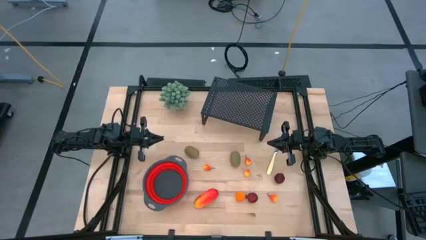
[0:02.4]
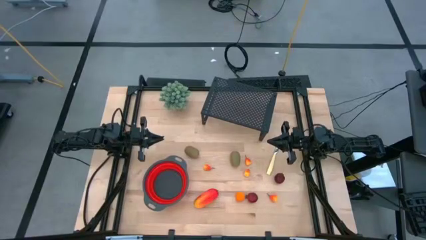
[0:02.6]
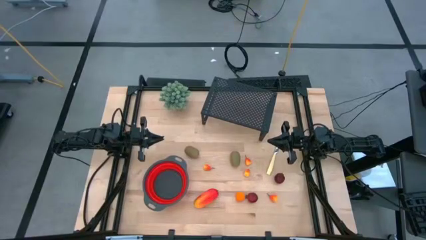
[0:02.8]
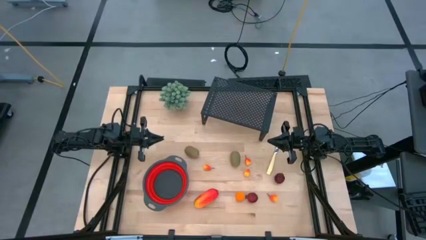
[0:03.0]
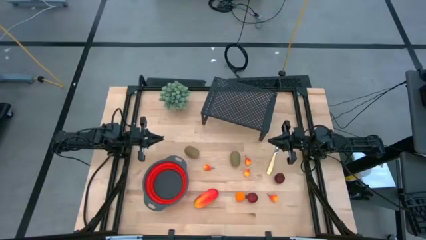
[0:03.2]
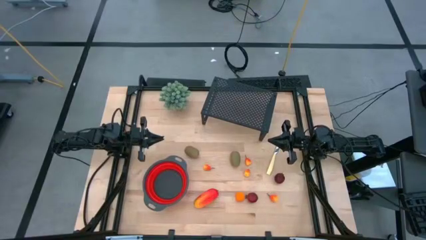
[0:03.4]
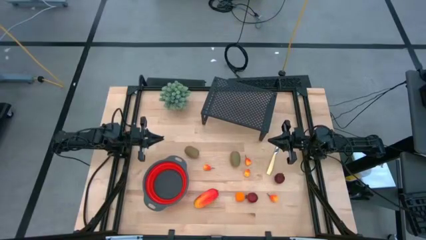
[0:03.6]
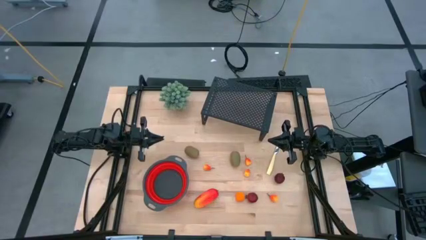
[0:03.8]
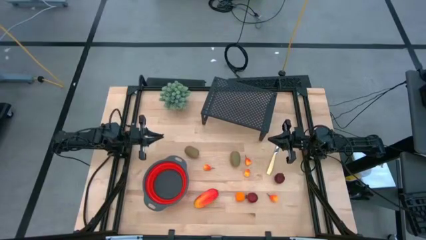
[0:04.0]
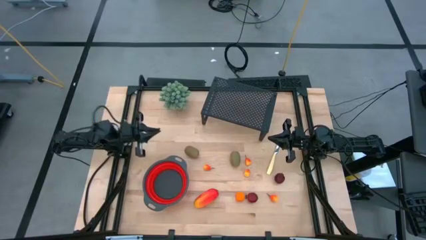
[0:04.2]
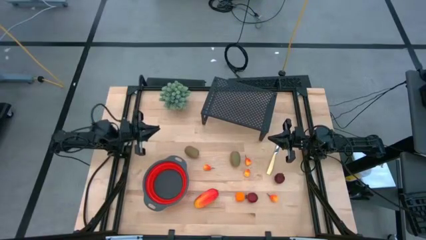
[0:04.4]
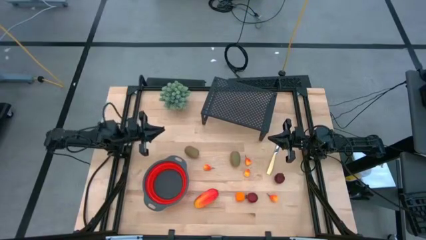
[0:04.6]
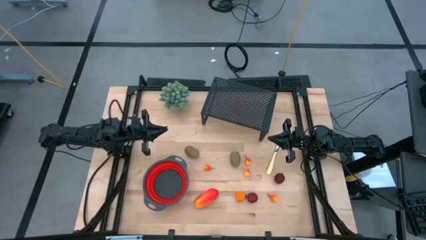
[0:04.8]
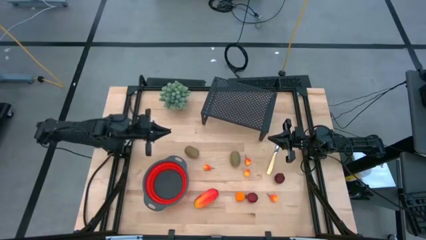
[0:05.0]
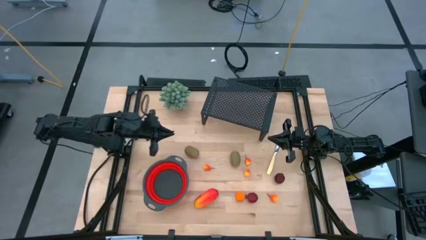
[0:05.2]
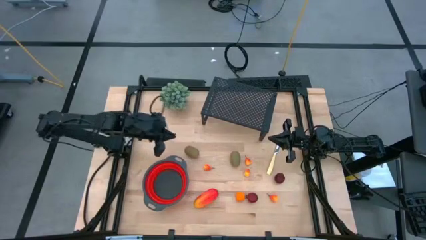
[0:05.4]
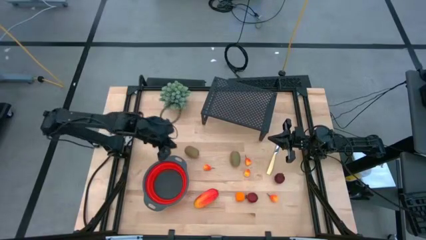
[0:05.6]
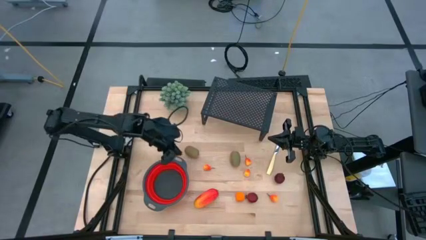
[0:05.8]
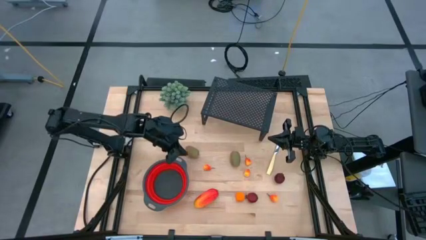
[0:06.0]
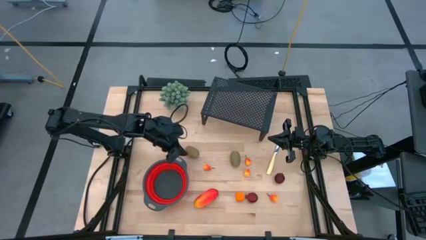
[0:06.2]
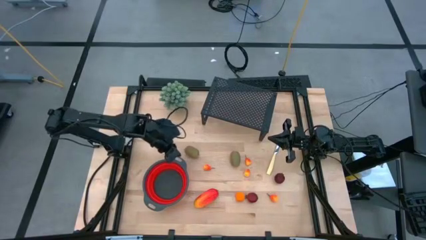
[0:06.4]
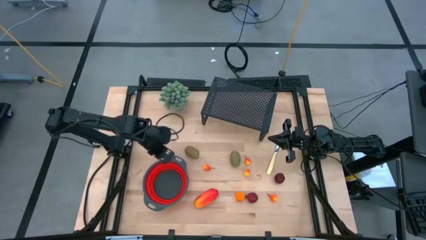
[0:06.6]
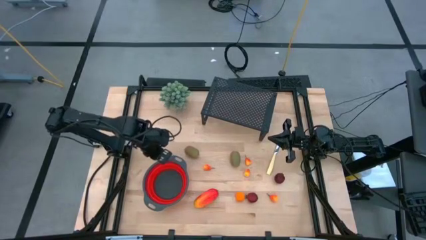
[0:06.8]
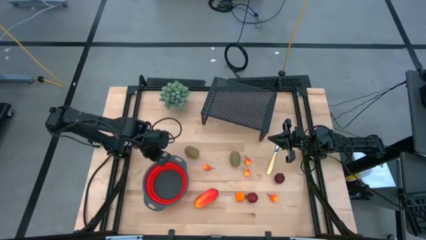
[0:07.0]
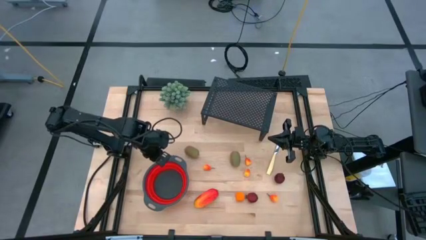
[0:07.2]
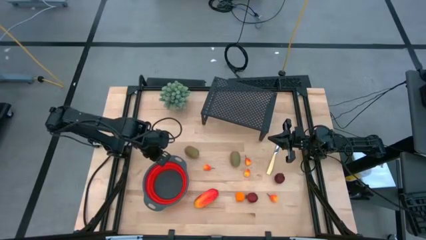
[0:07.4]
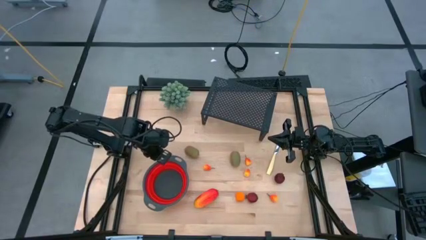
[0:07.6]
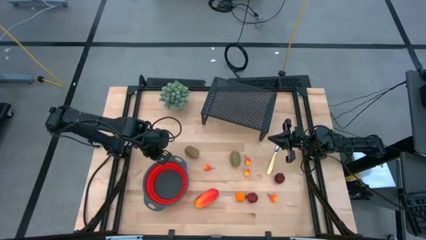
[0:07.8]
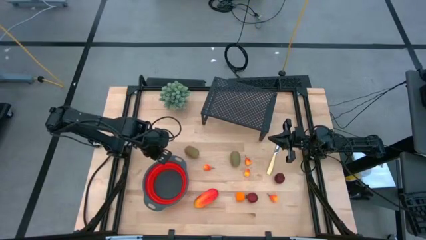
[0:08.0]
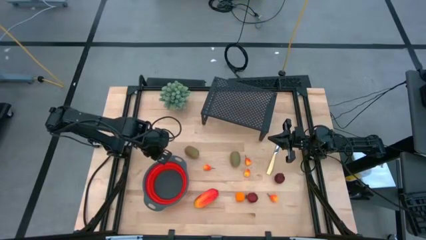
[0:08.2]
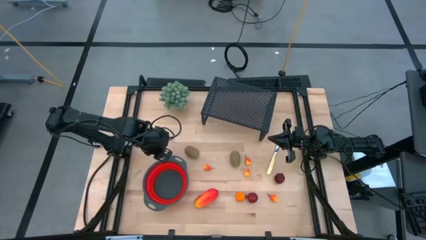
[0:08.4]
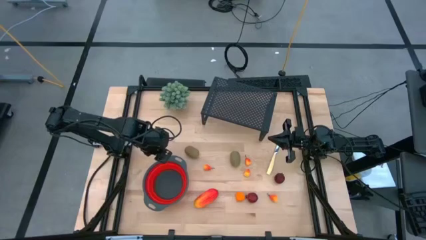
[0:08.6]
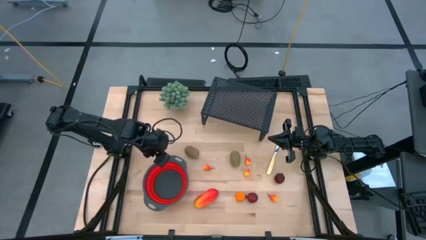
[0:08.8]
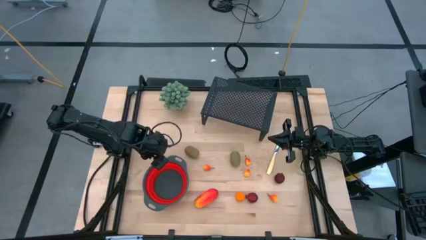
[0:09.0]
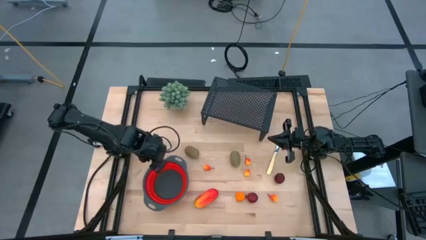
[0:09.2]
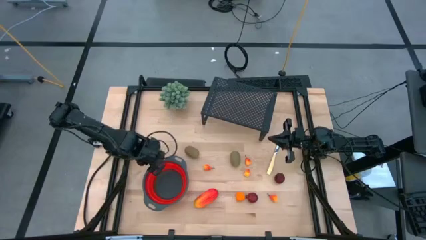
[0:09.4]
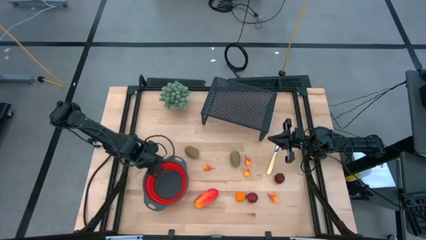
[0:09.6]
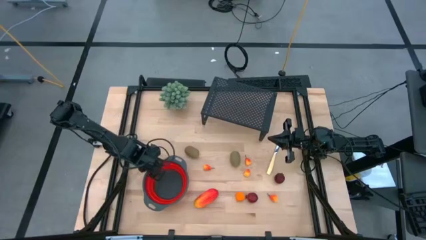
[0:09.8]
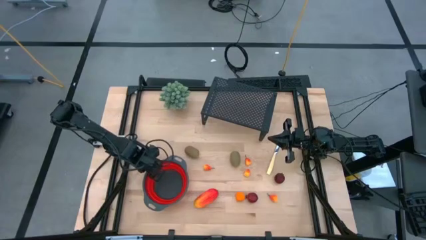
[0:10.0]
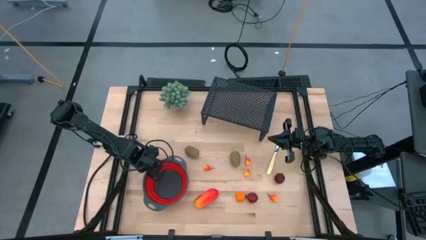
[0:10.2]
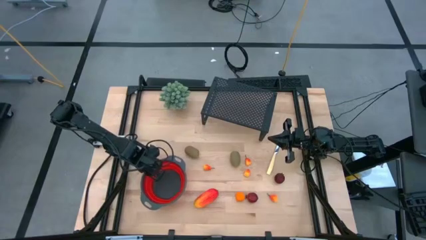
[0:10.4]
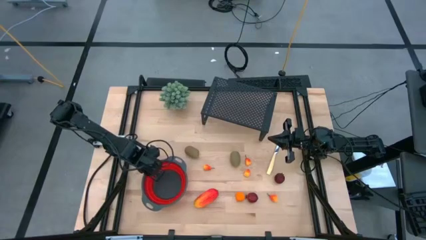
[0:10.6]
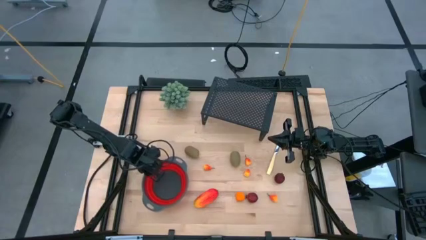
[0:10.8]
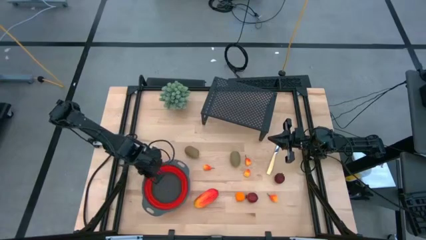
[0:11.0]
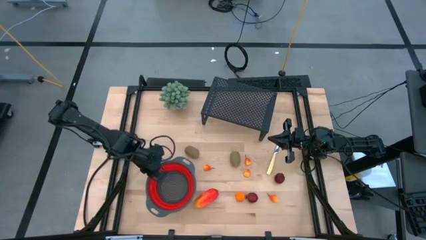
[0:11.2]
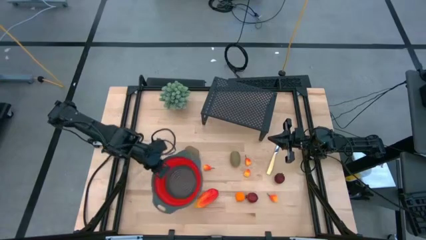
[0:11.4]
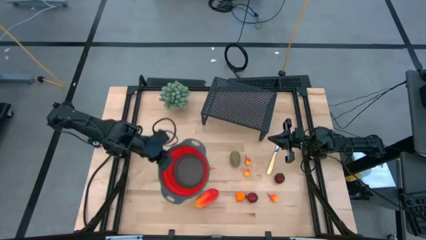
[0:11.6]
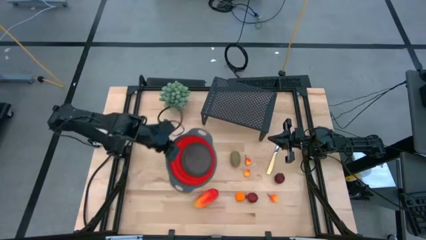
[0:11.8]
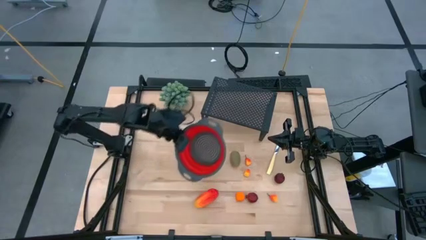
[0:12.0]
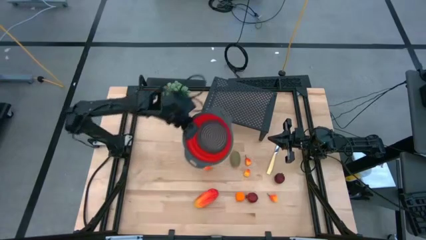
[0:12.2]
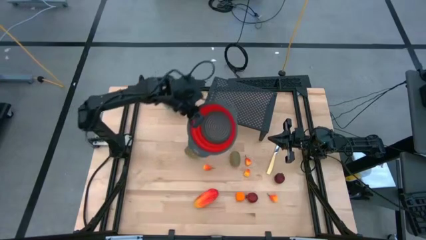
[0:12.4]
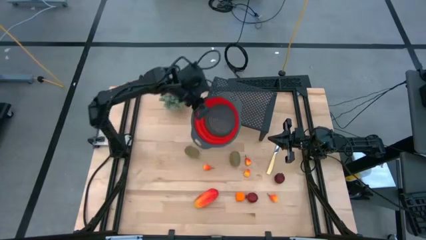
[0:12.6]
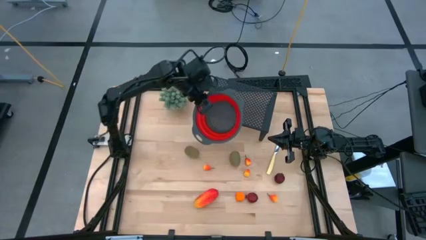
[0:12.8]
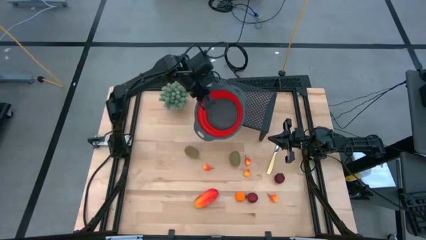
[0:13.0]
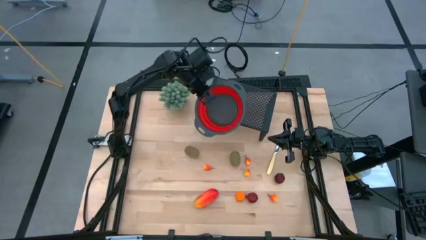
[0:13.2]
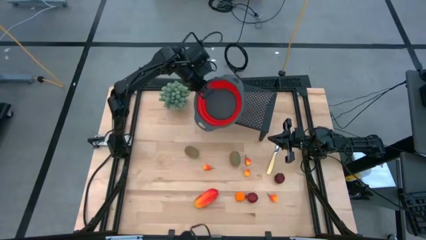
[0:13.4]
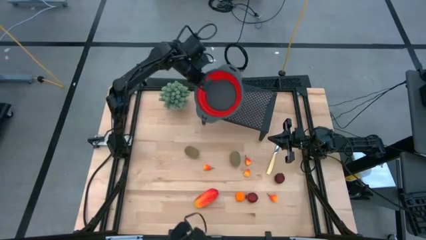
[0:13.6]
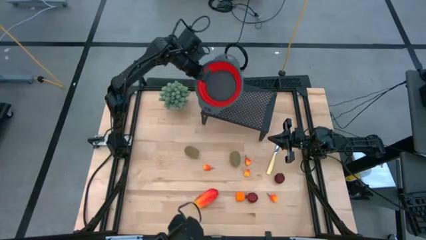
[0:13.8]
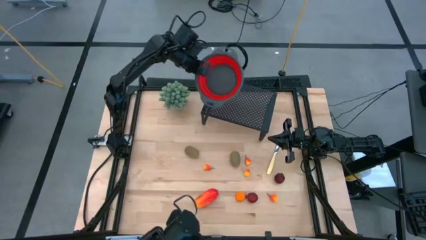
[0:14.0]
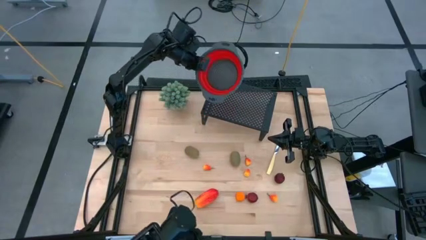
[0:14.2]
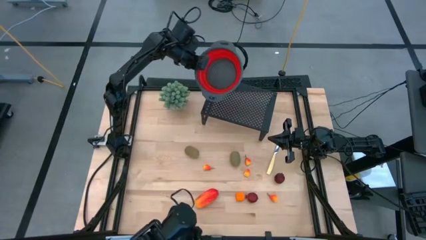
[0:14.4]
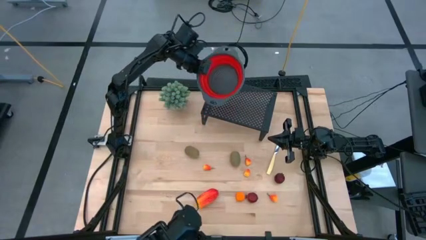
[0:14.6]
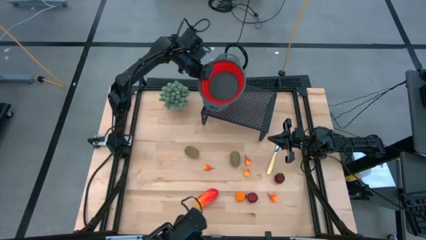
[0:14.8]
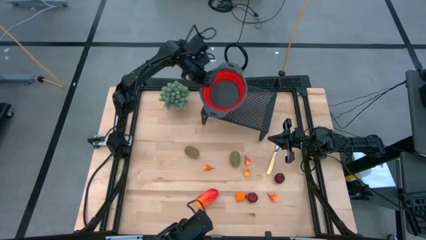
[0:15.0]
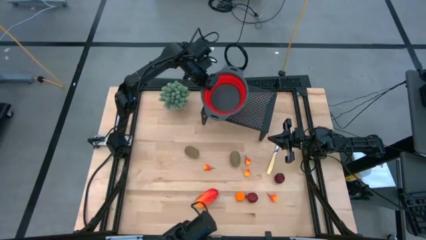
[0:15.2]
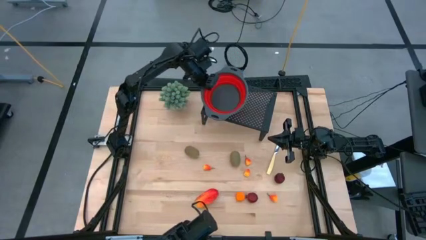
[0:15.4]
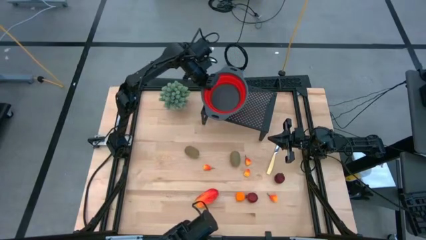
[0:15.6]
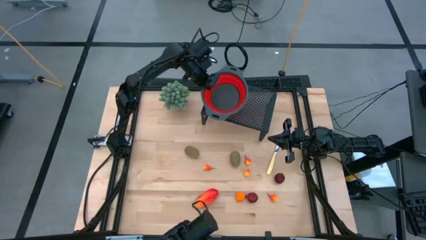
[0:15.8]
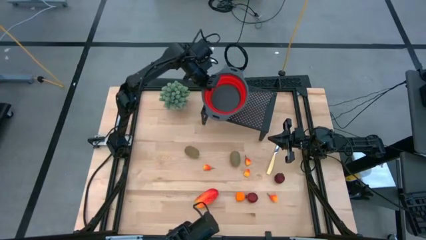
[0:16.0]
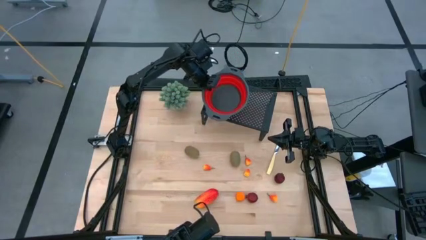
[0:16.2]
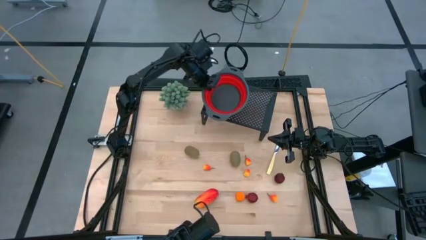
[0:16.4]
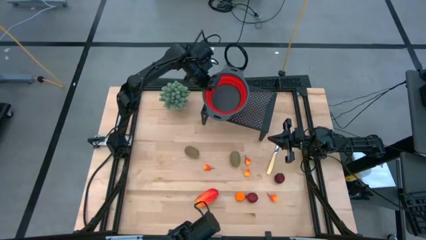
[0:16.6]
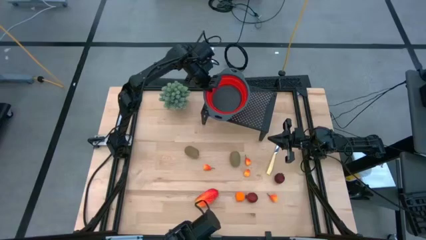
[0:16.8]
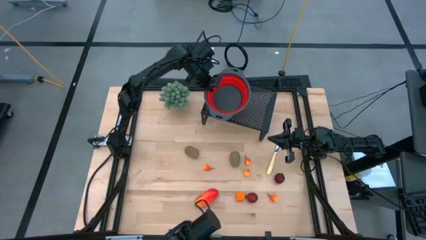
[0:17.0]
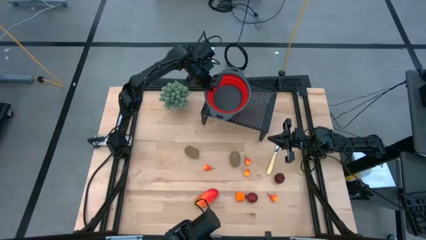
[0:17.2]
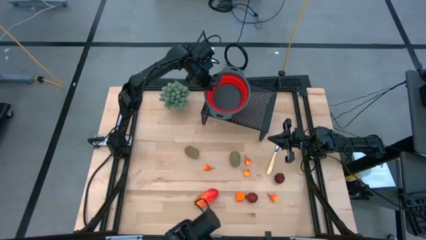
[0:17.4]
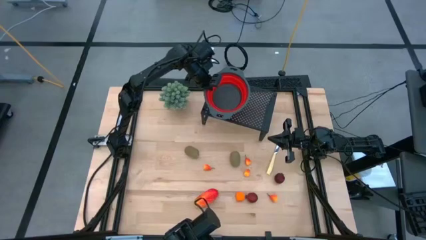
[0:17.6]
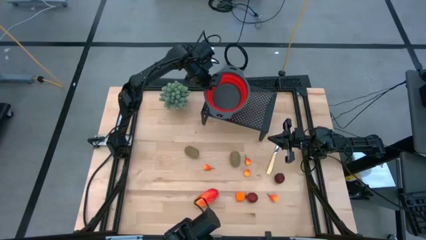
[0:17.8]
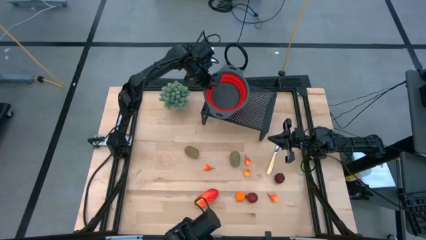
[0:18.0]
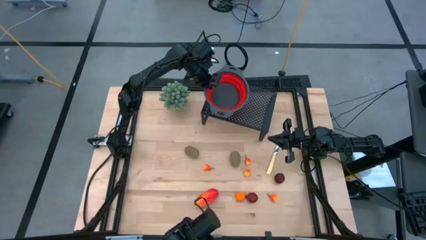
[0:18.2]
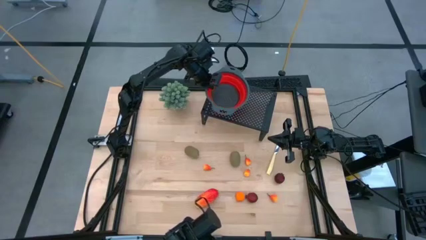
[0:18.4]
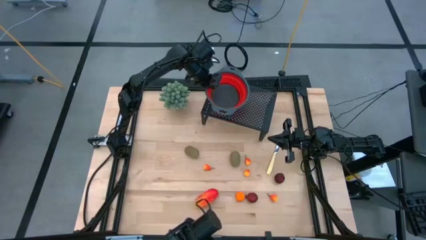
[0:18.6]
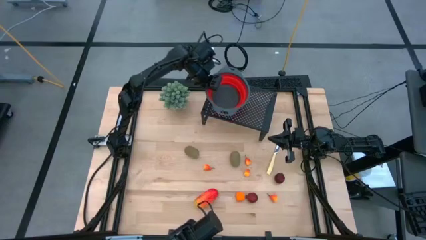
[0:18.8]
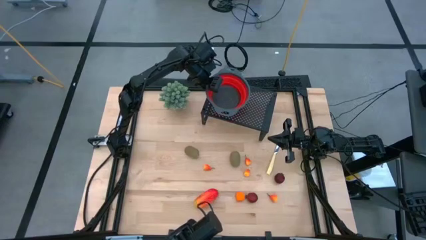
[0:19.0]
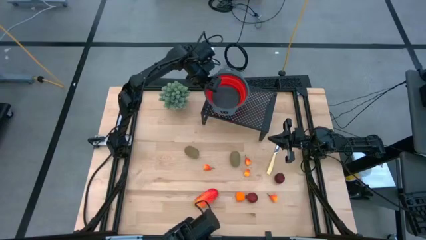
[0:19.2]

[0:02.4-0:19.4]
Task: Pick & Place Fruit
Put the red strainer bowl on the shelf
